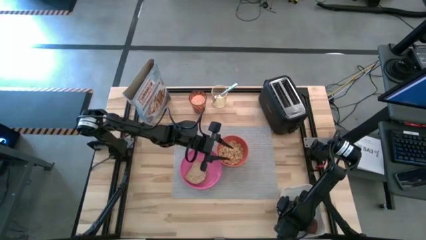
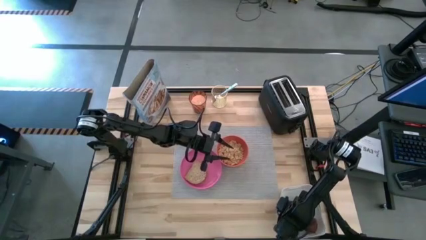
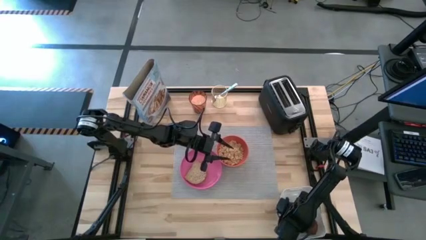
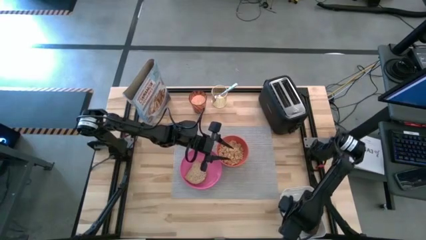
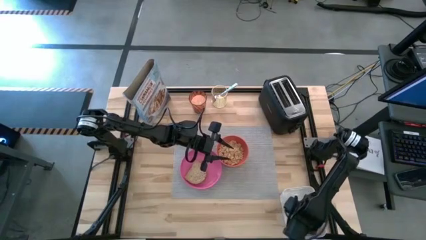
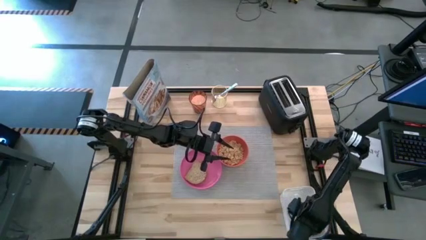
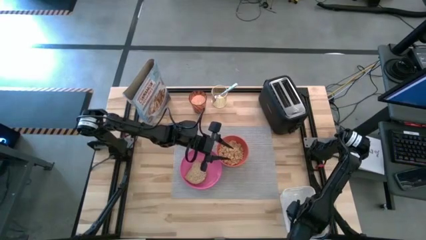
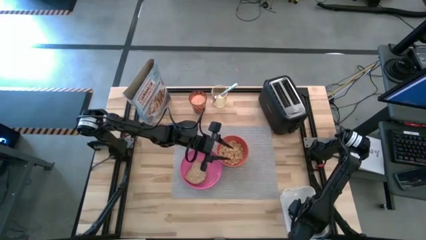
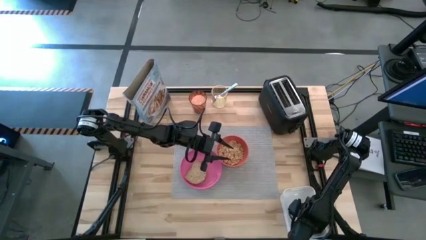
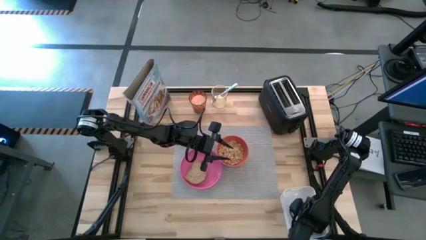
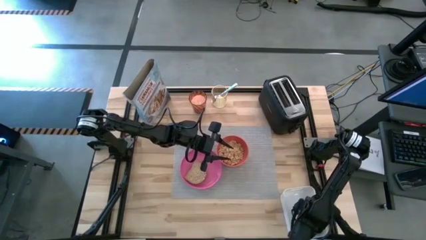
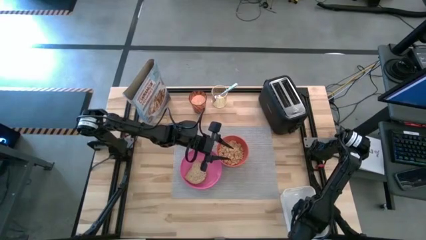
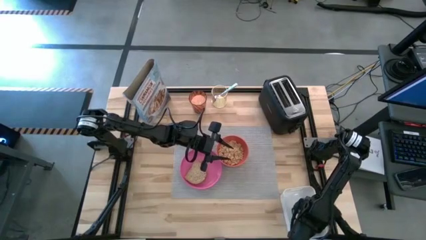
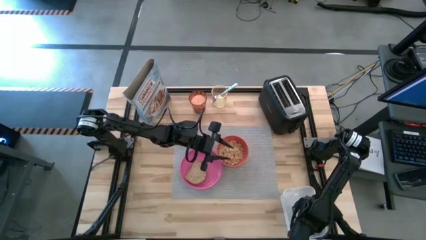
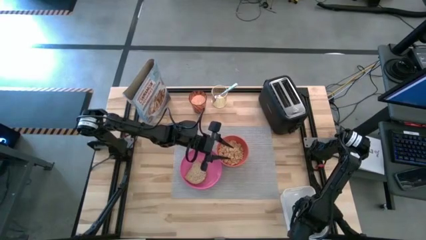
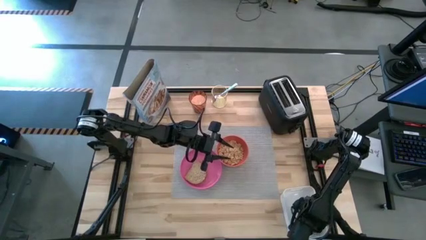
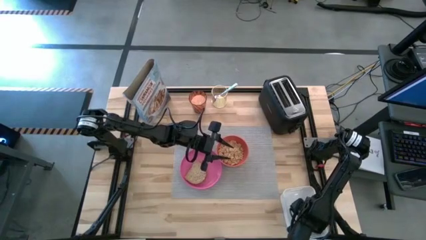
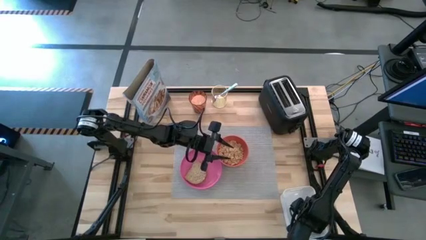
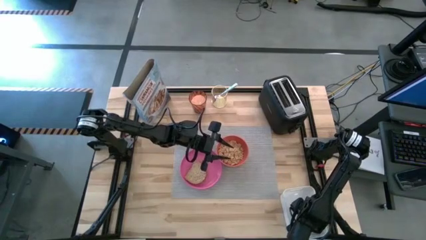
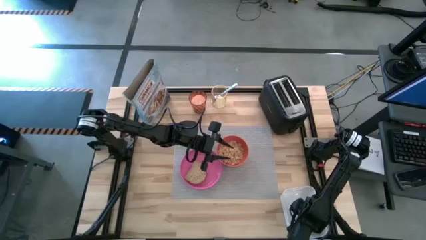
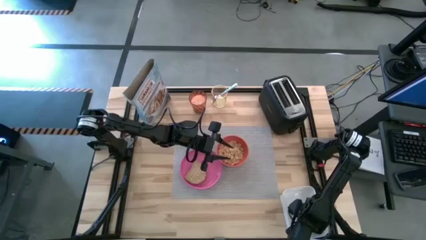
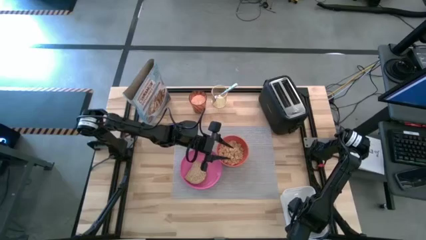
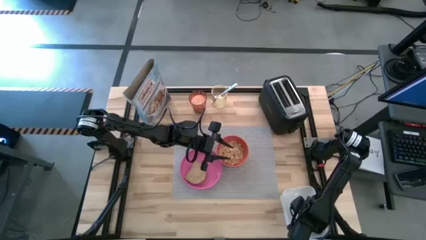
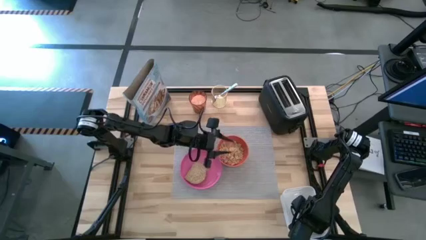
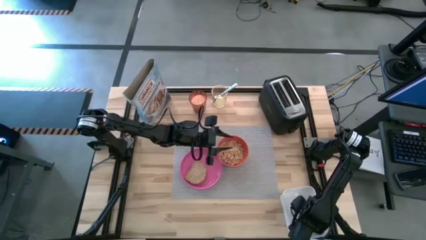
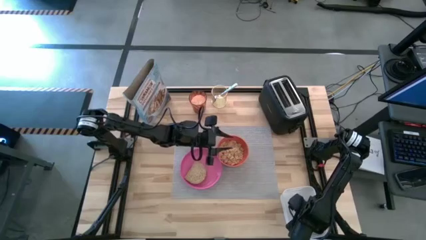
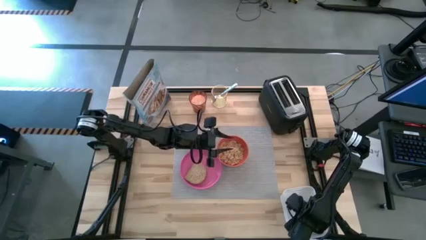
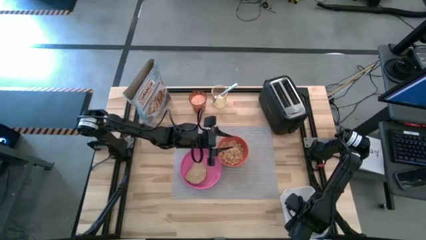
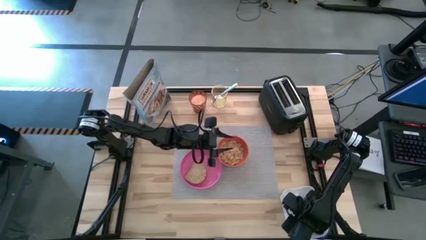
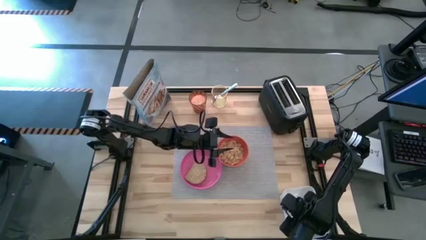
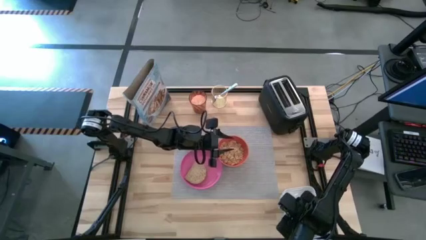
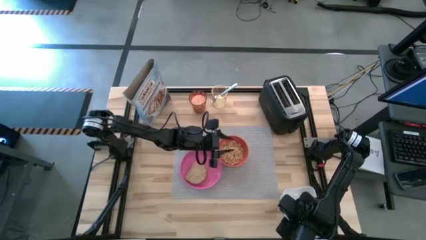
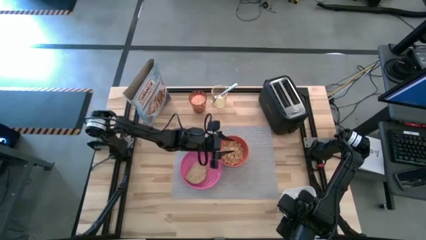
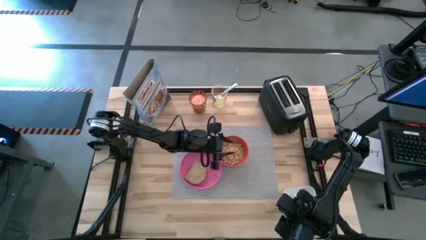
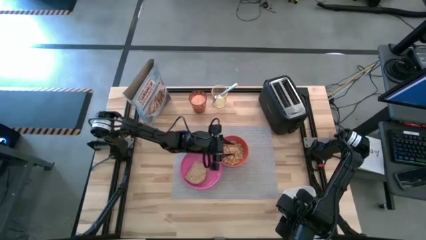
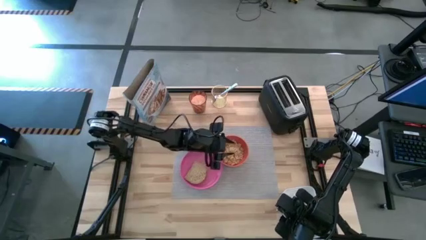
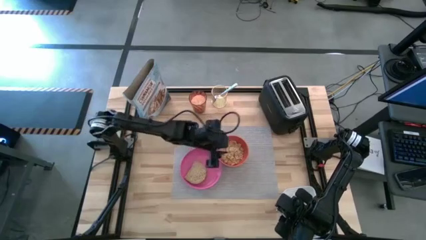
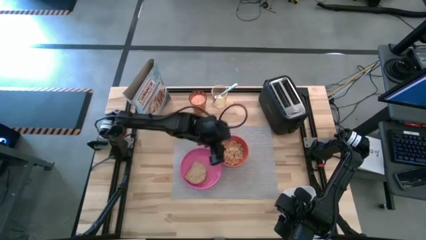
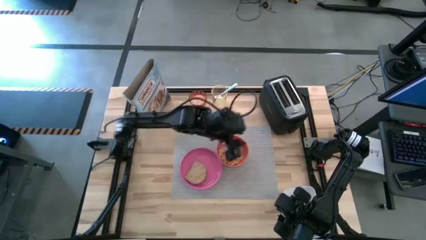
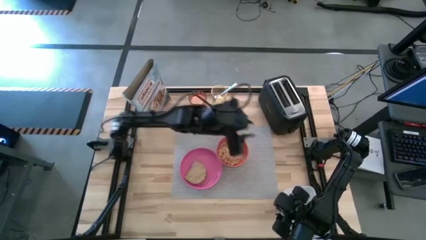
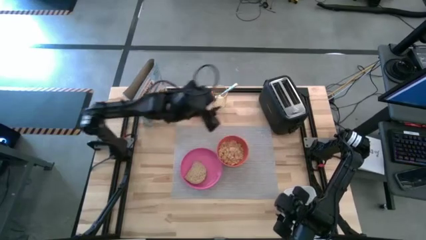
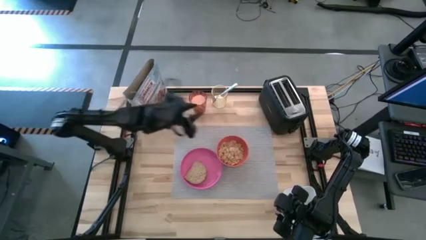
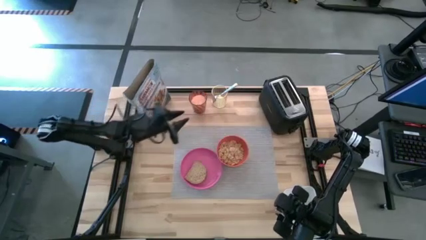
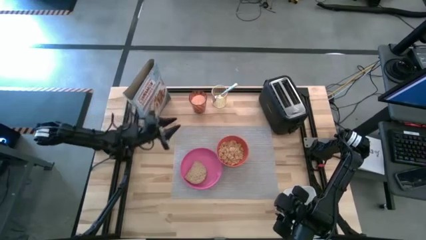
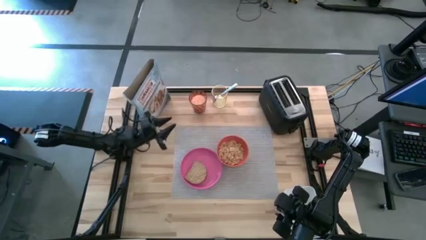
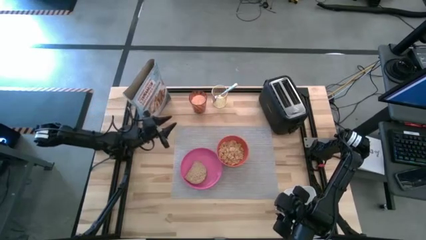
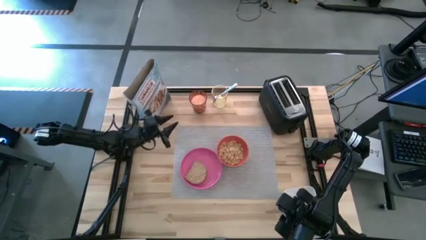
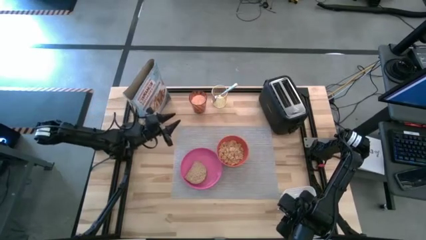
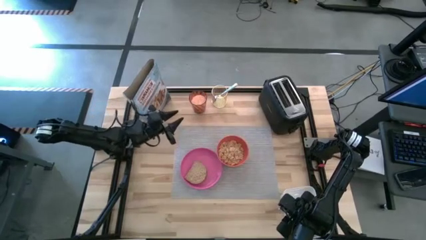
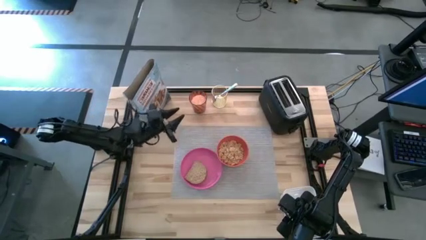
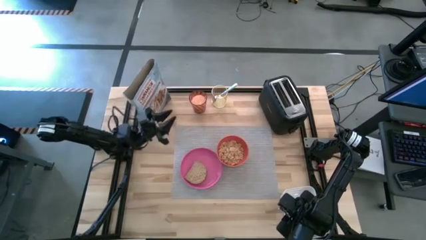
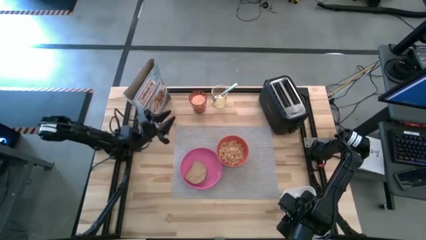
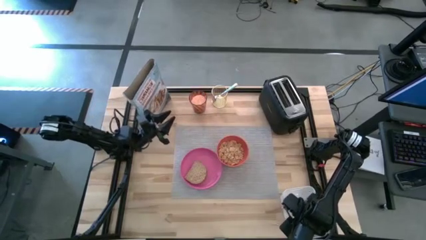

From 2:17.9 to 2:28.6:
Task: Arrange a breakfast setting
Put the apple on the gray table mat to the bottom of the orange bowl
